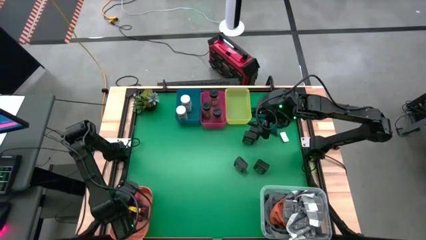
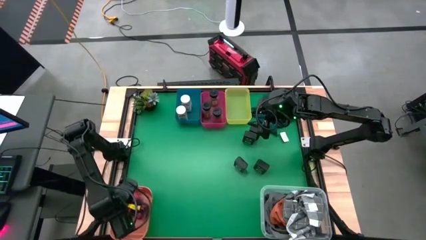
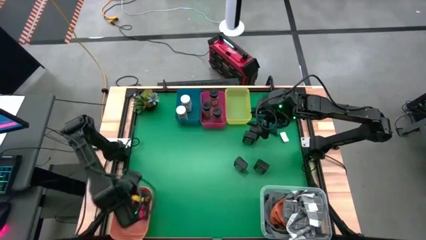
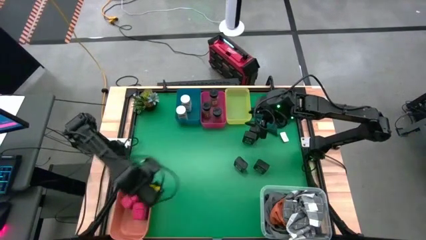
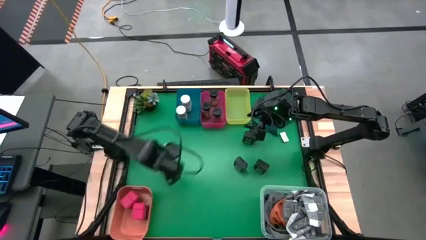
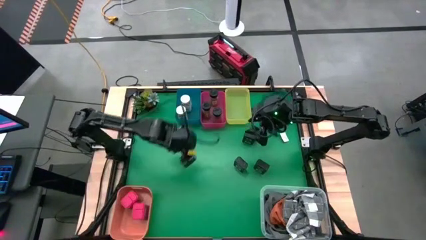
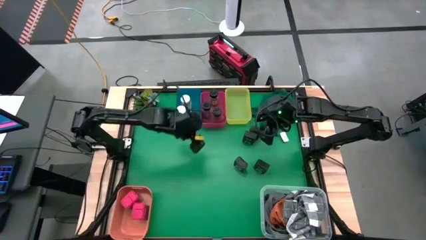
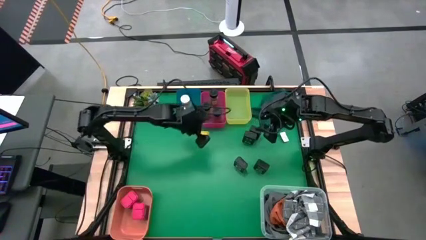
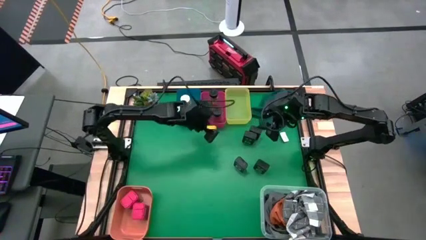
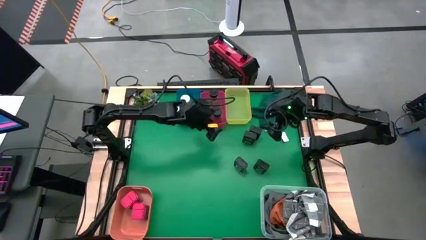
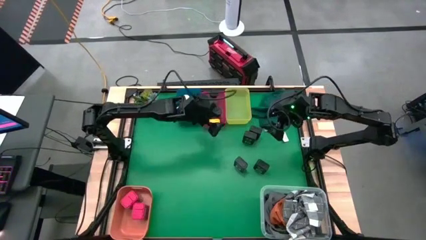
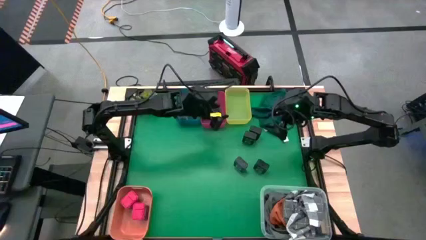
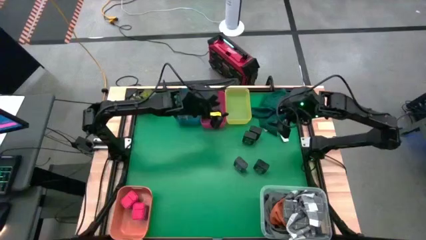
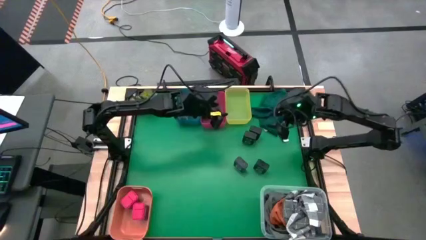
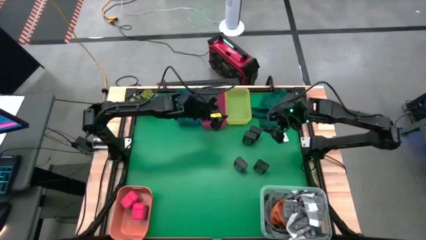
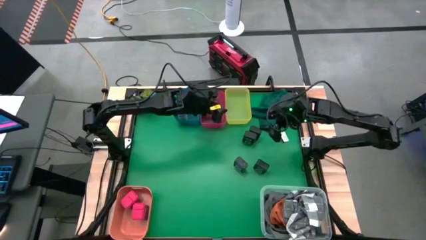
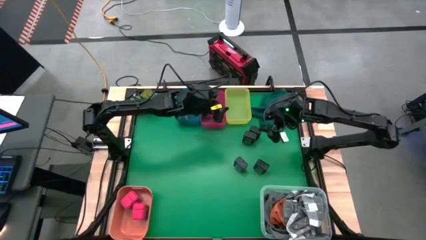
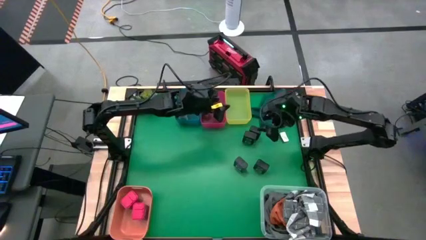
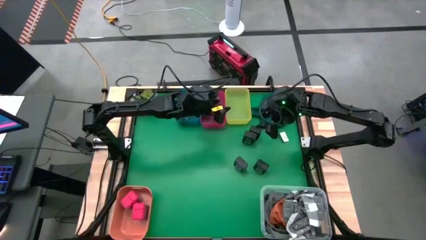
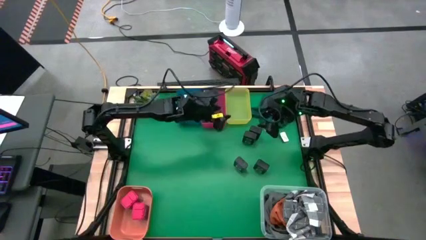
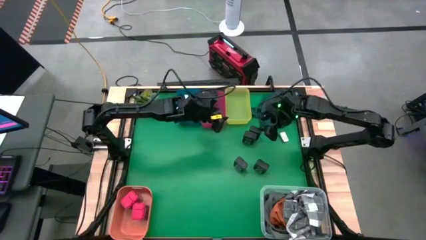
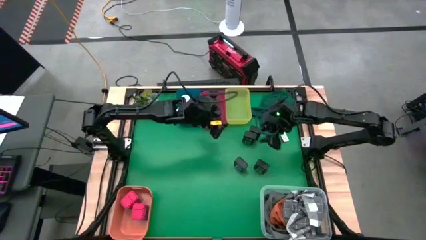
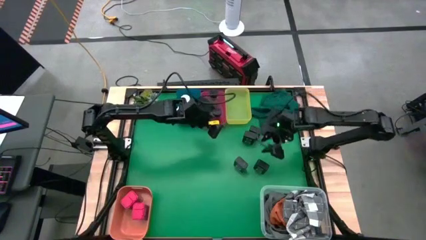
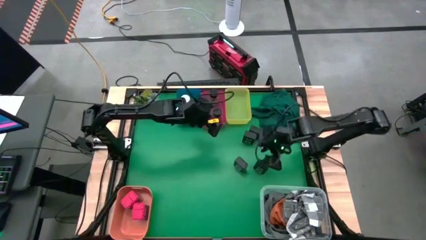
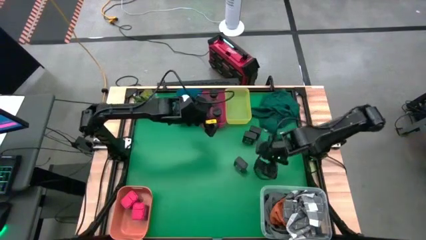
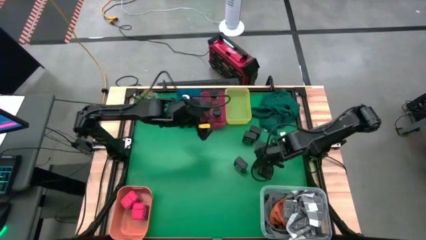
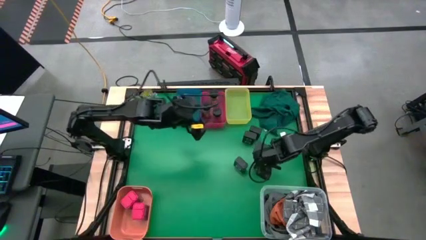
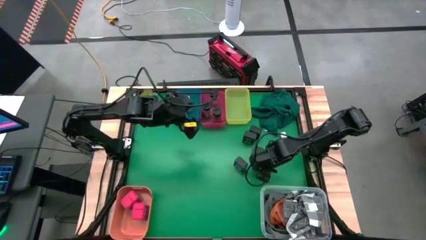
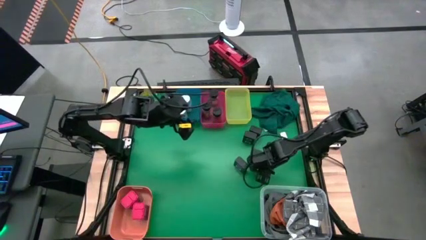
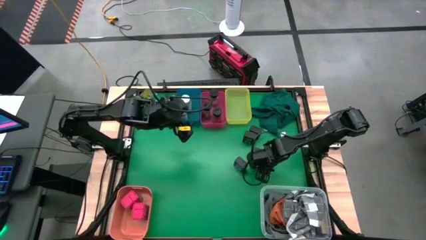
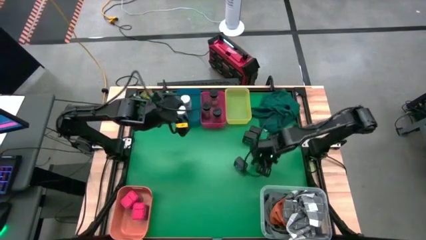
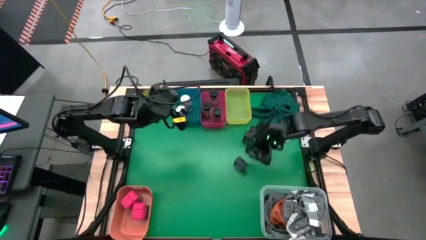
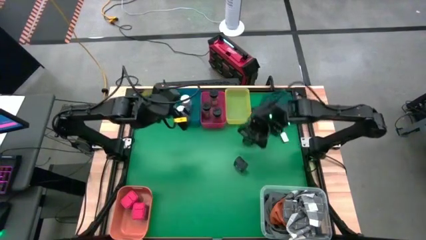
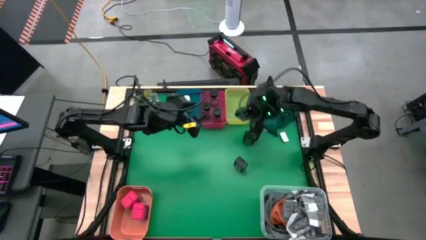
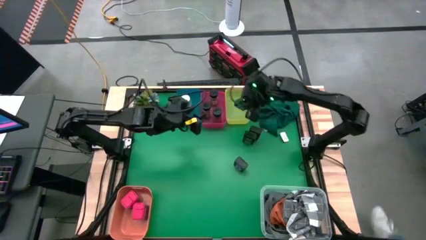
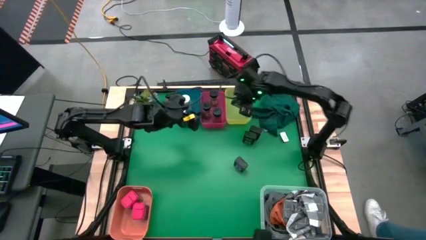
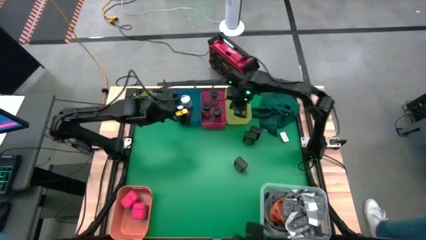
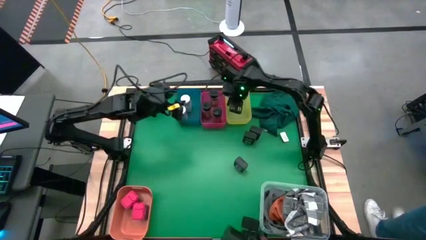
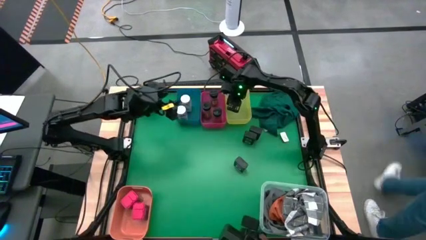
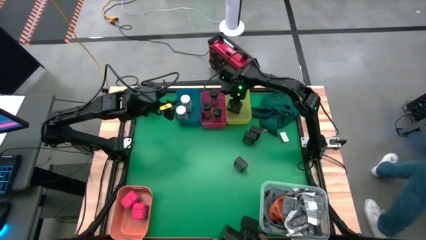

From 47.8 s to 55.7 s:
Task: Sort spices by type
Put the bottom right black seasoning can into the yellow bin

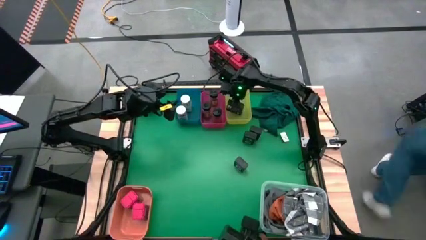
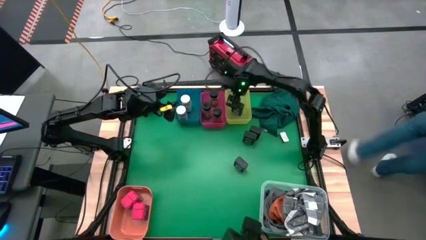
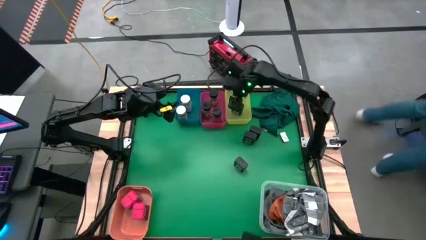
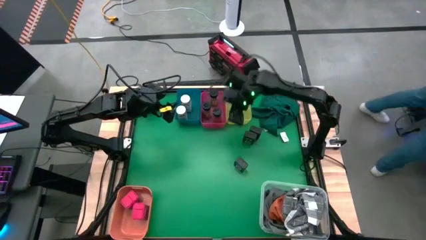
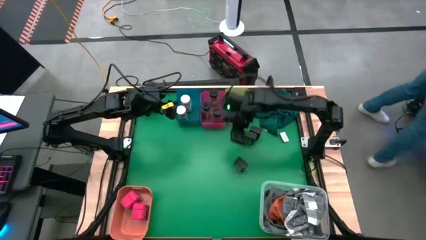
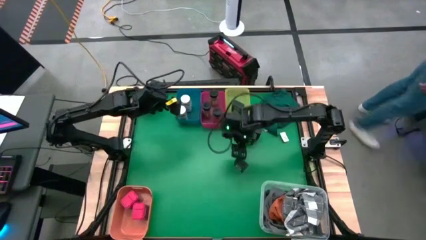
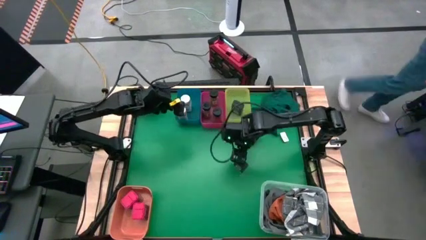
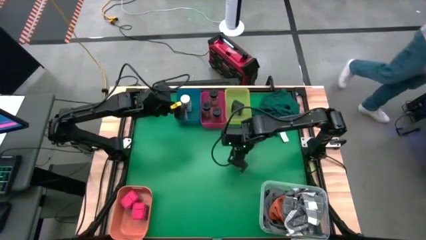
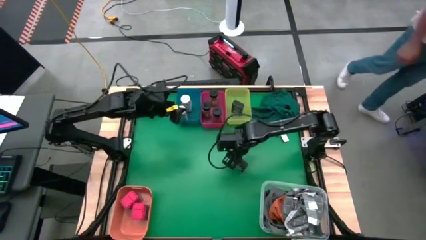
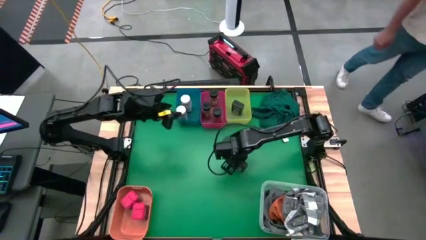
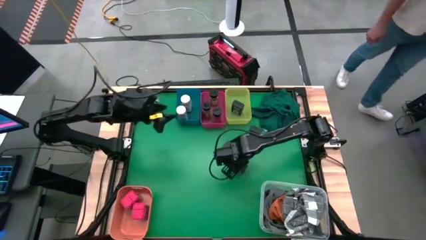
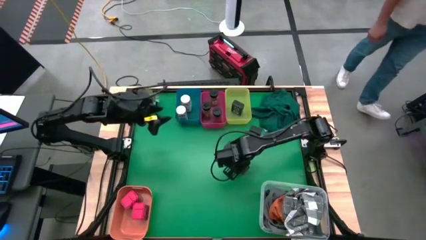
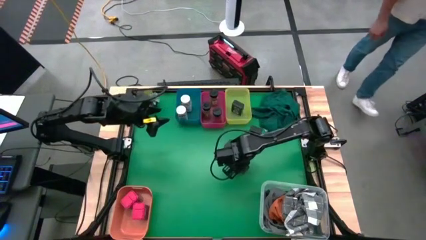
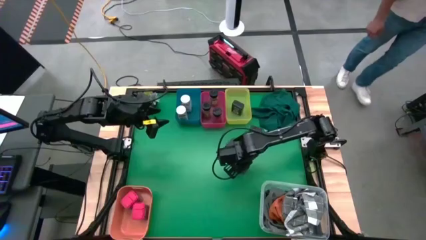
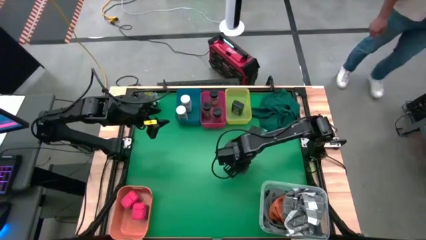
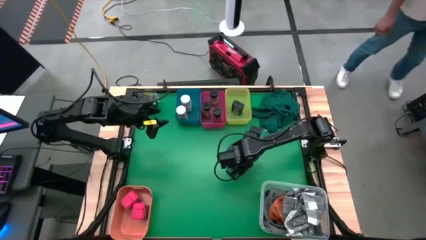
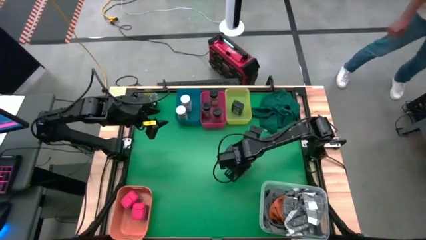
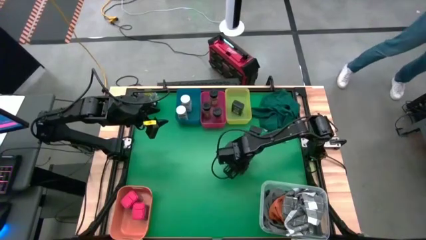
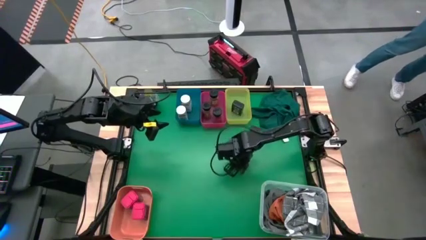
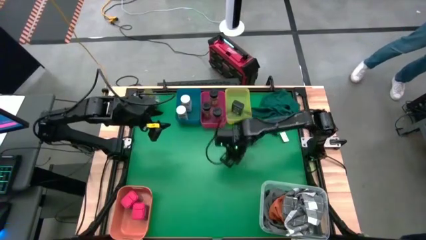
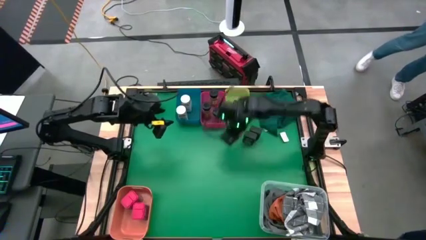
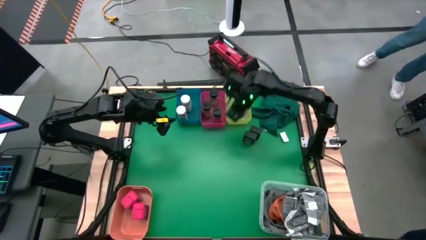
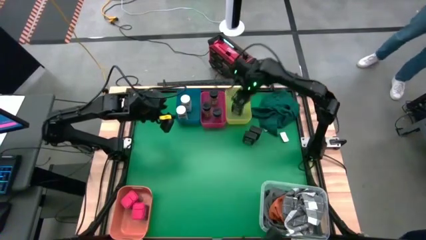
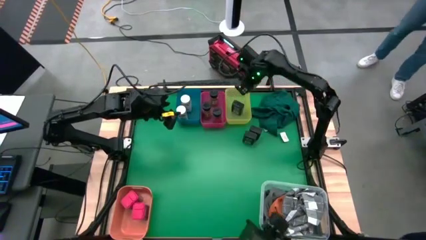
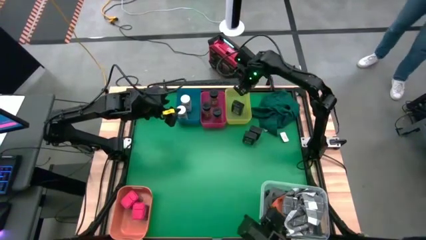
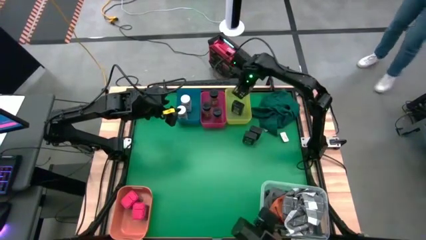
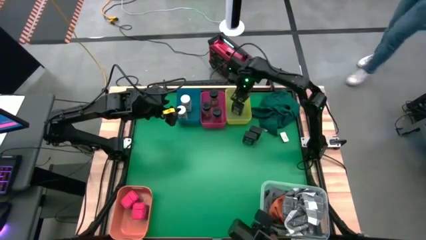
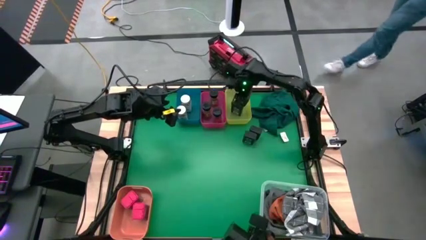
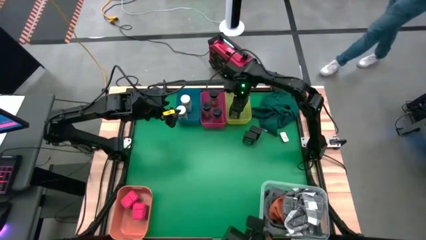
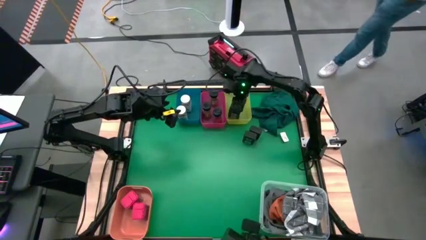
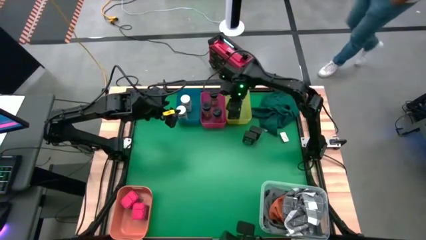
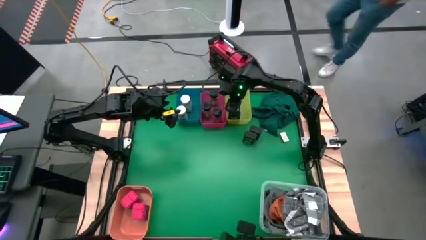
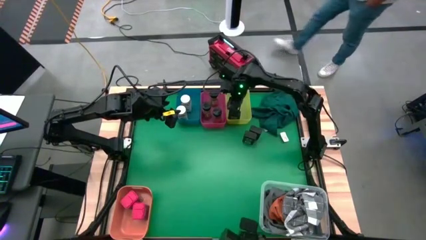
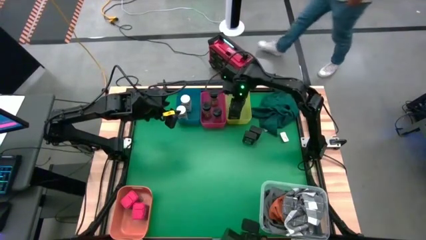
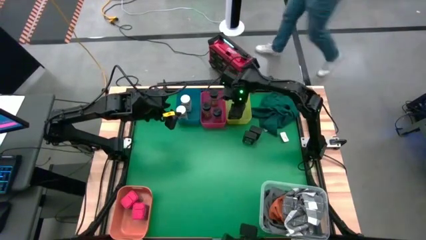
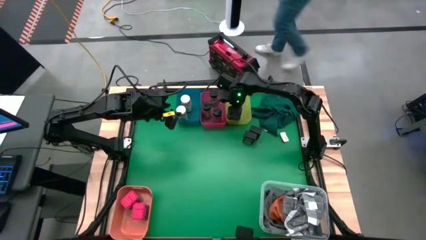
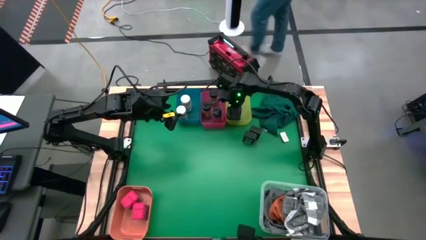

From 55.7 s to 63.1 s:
Put the bottom black seasoning can into the yellow bin

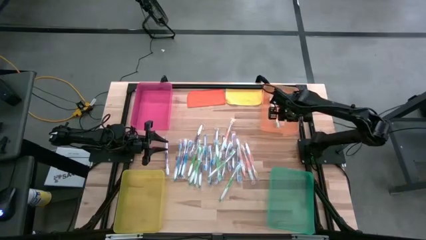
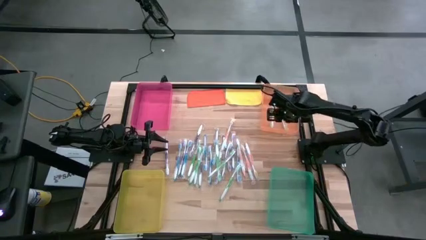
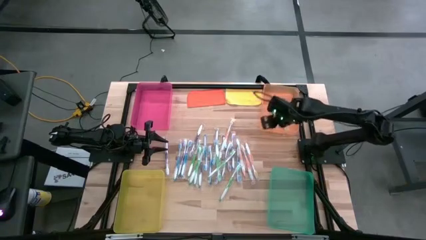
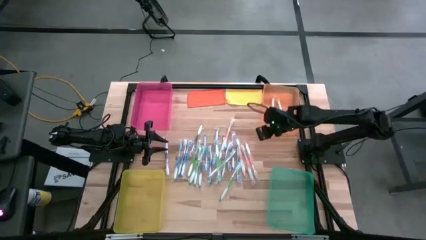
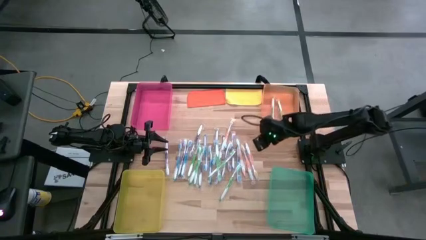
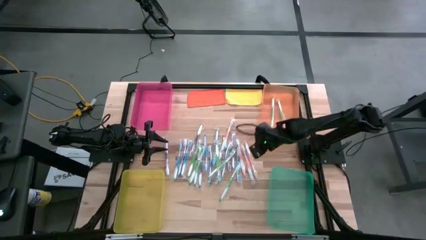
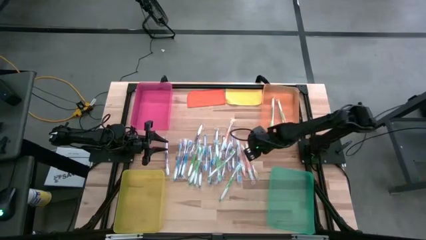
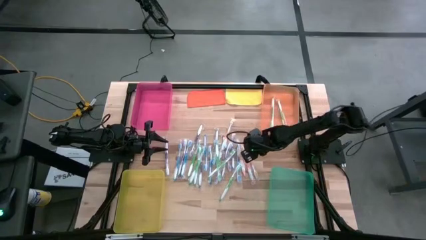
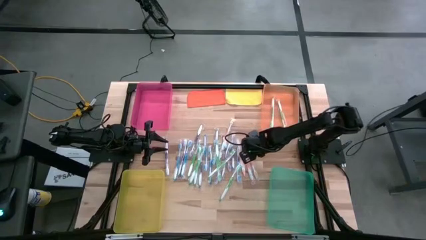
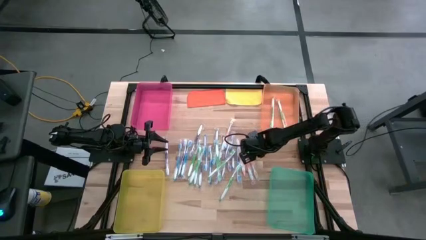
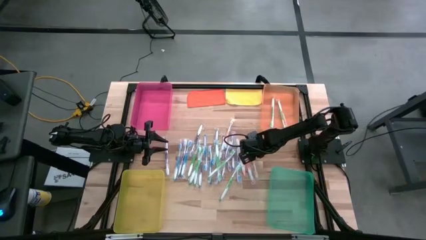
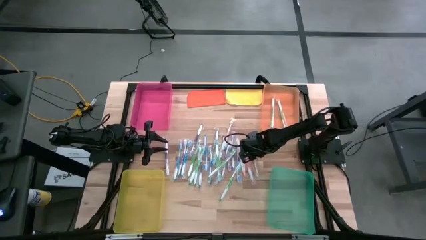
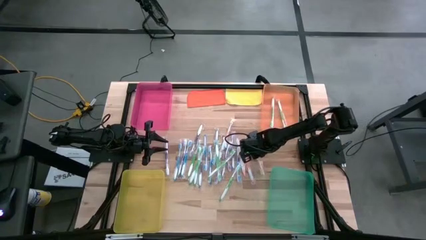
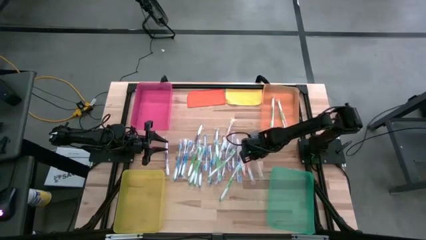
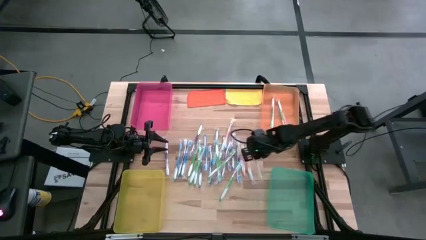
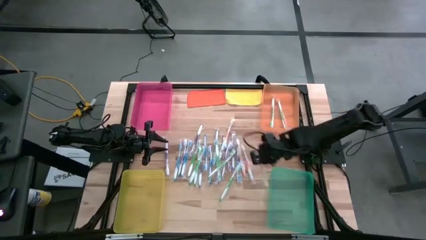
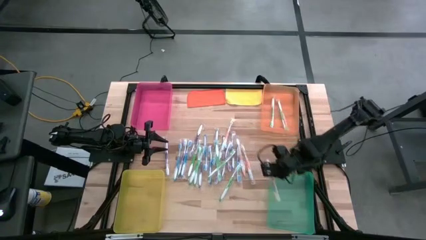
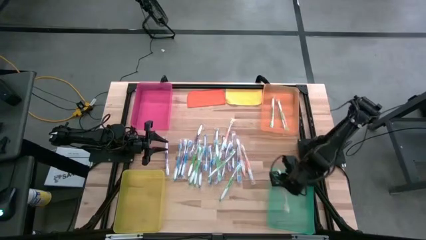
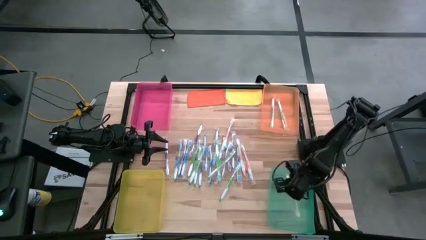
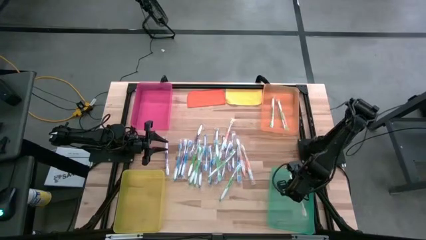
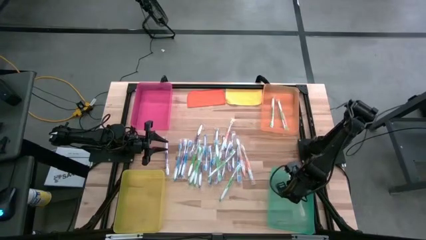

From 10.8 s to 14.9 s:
Task: Pick & Place Toothbrushes
Put the orange toothbrush into the green bin
